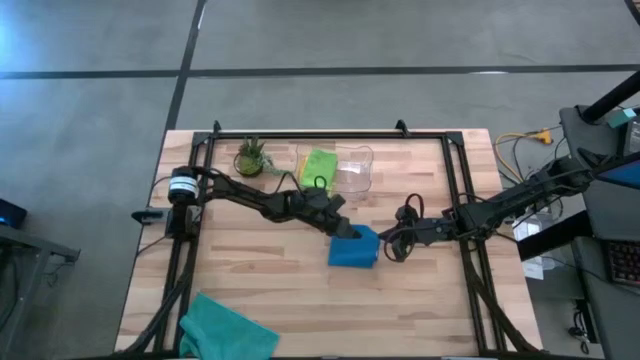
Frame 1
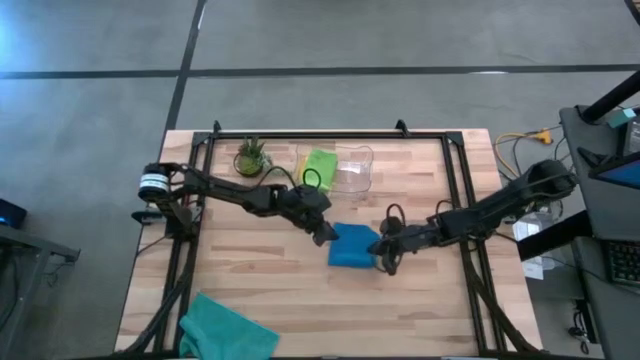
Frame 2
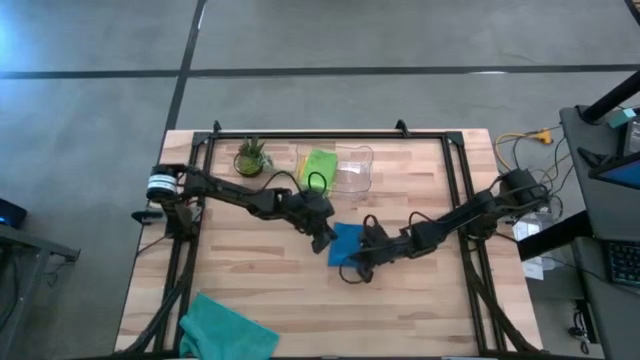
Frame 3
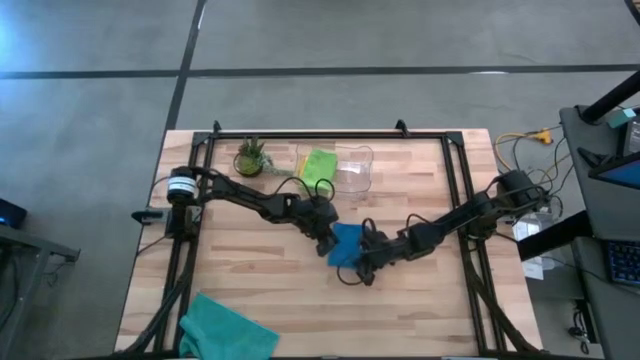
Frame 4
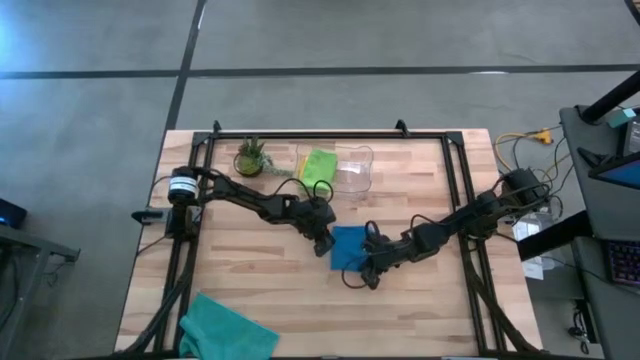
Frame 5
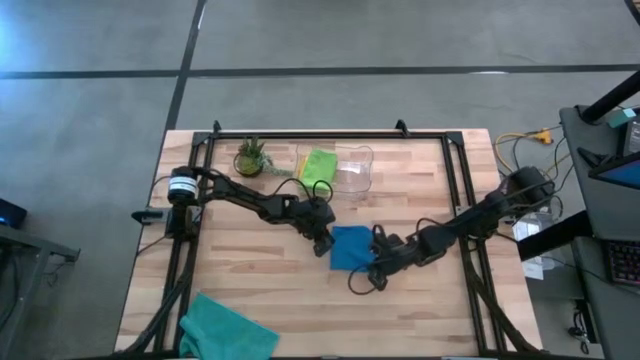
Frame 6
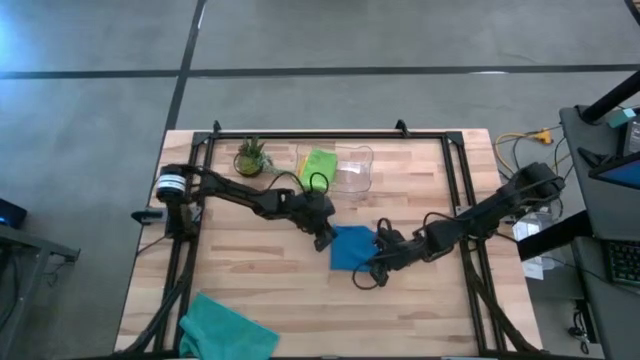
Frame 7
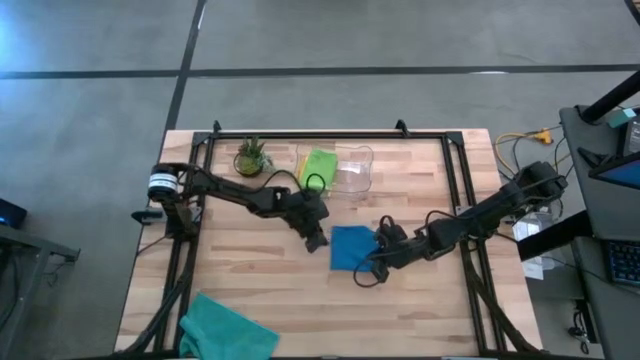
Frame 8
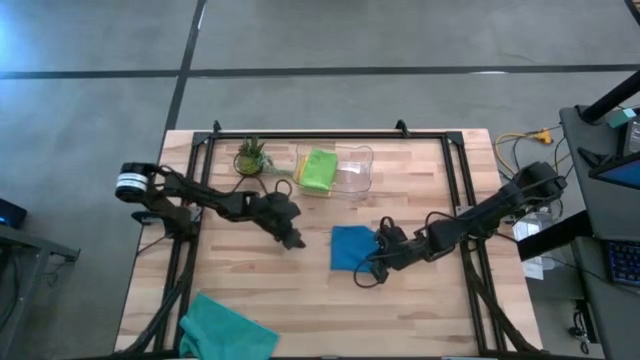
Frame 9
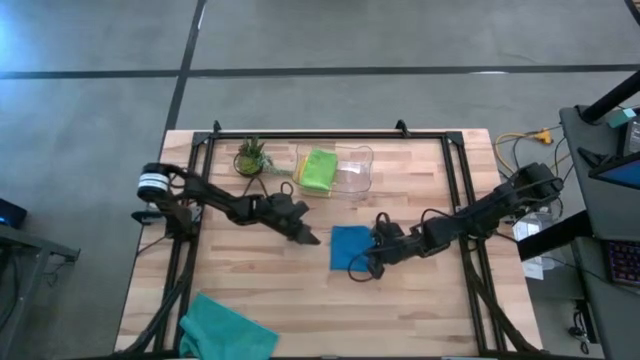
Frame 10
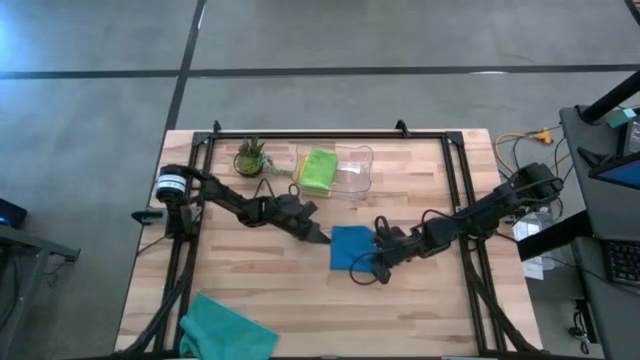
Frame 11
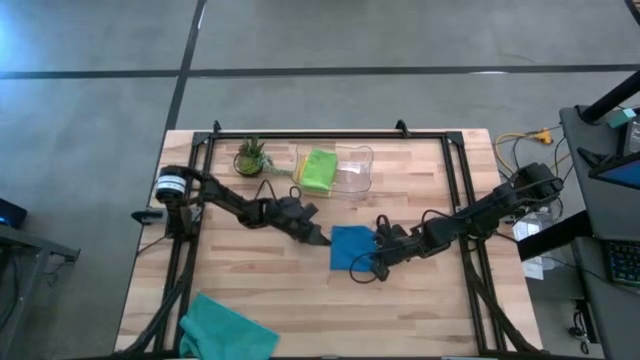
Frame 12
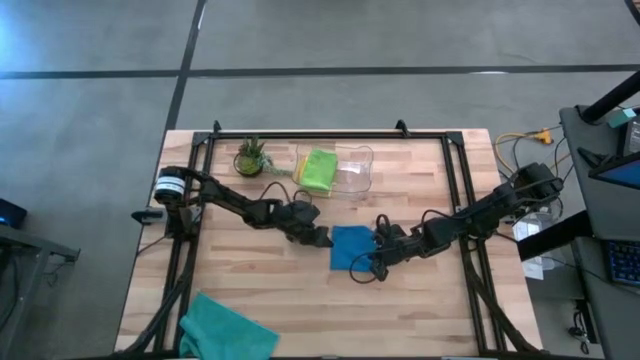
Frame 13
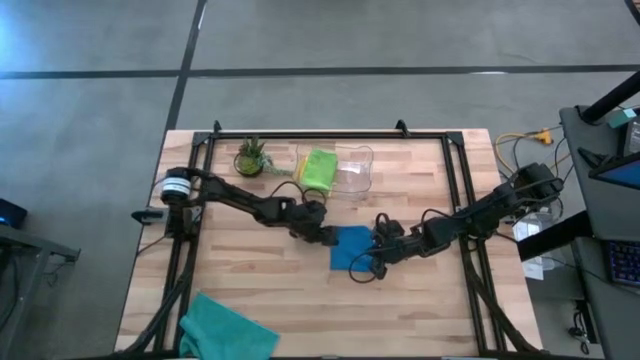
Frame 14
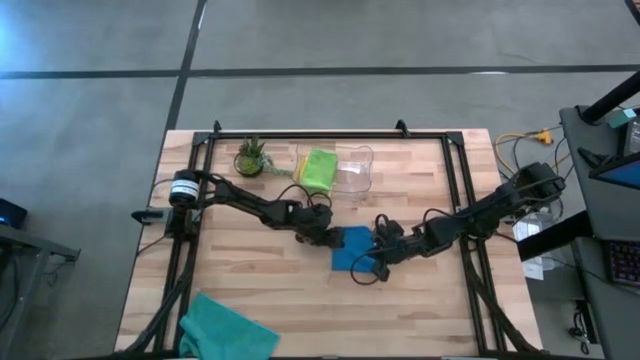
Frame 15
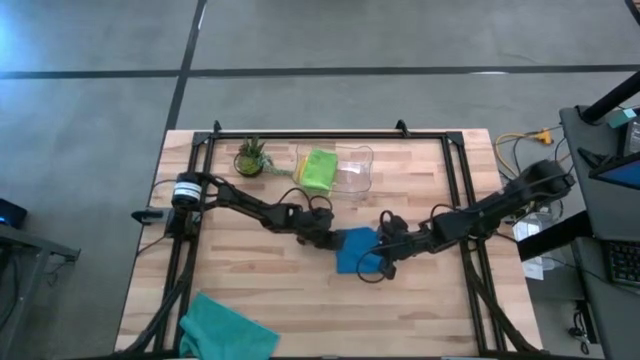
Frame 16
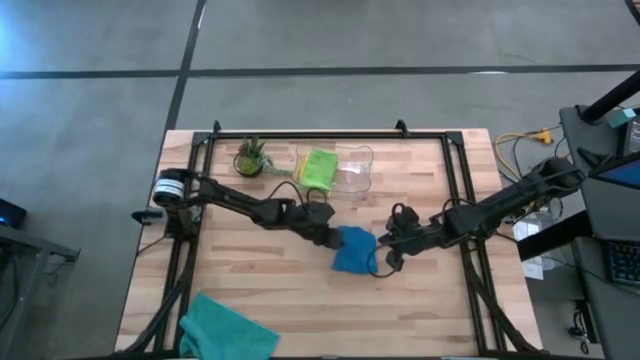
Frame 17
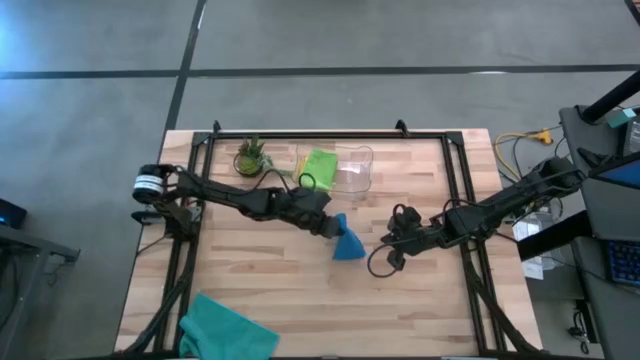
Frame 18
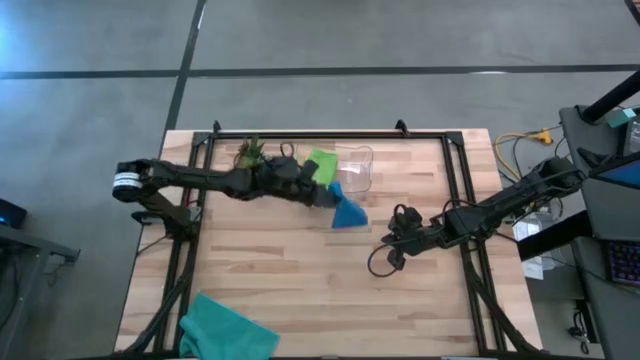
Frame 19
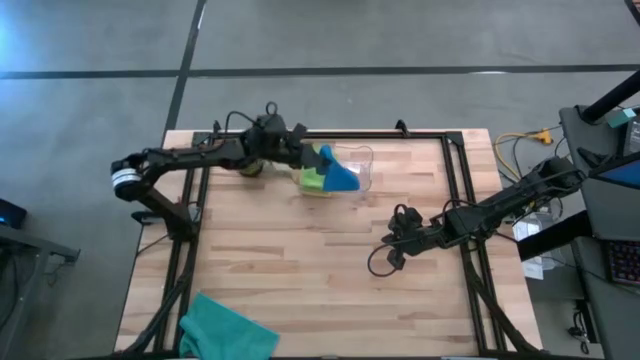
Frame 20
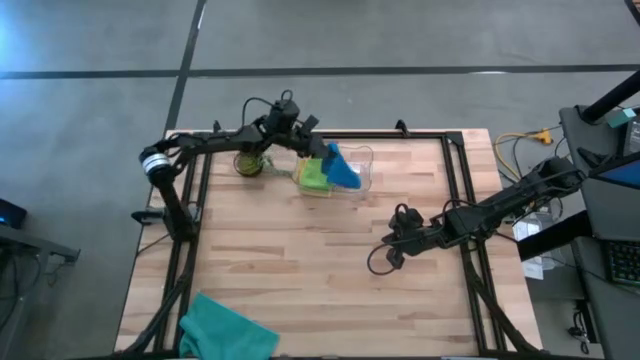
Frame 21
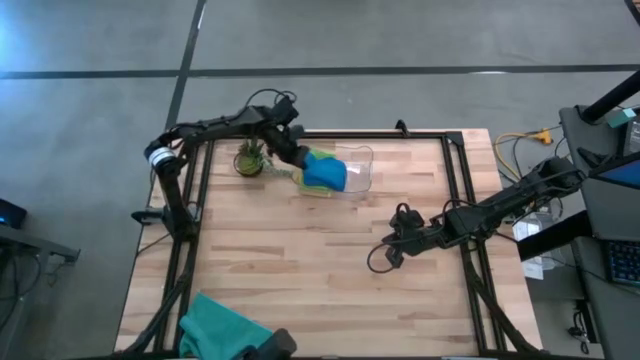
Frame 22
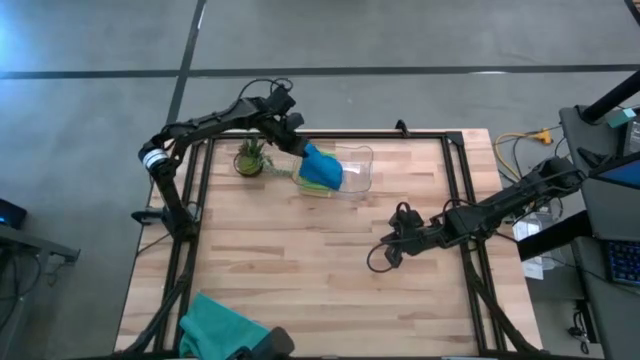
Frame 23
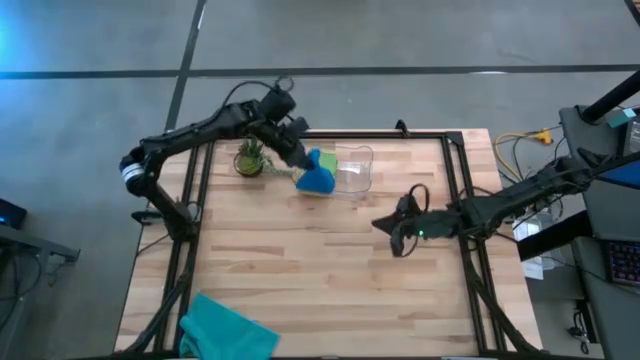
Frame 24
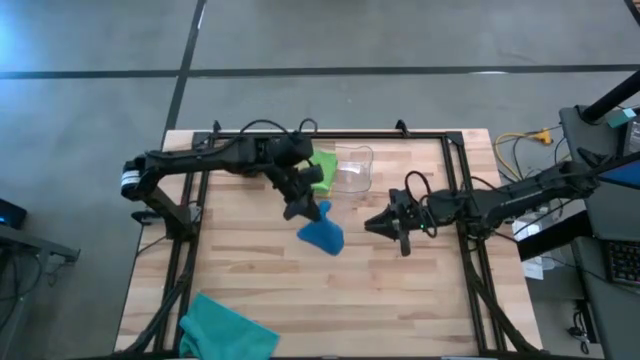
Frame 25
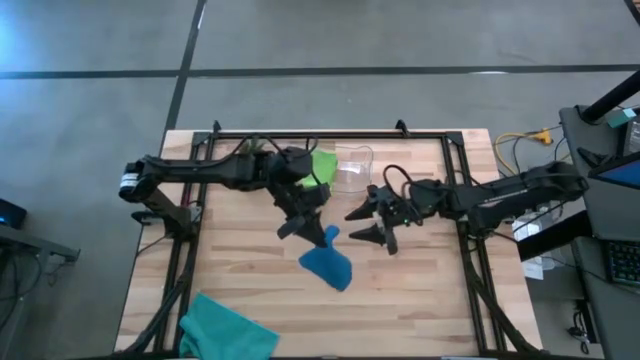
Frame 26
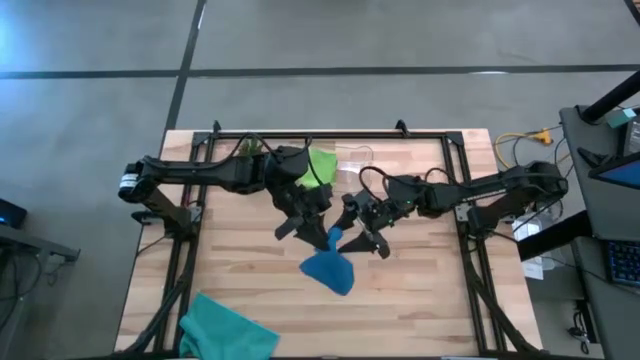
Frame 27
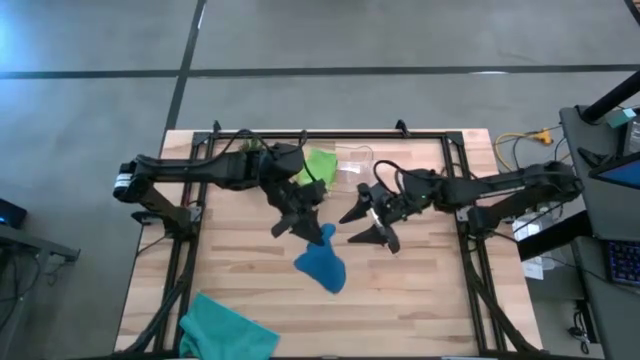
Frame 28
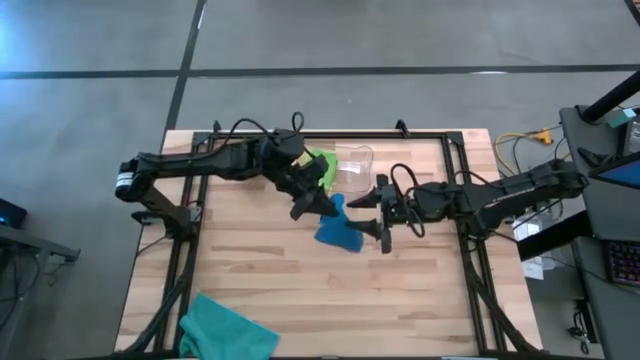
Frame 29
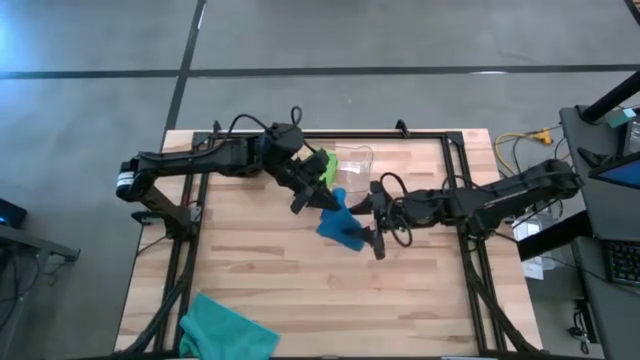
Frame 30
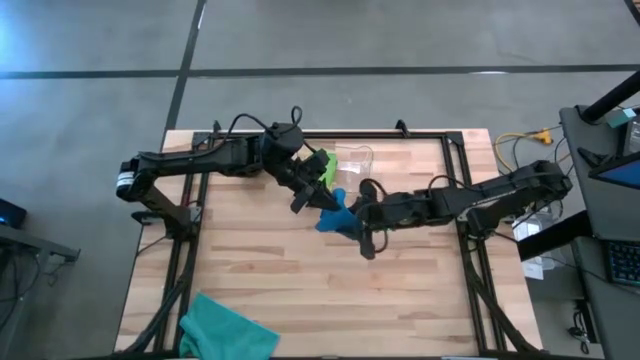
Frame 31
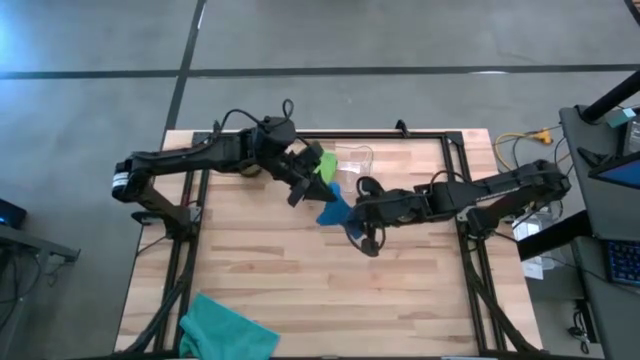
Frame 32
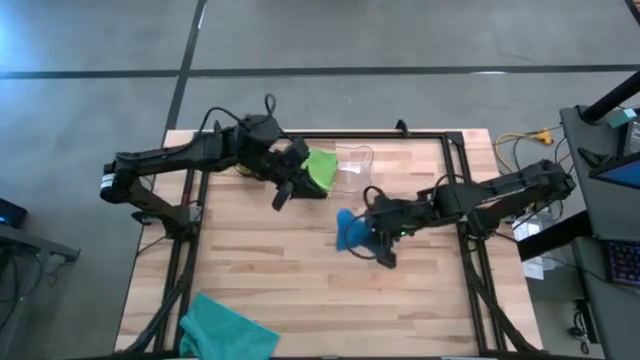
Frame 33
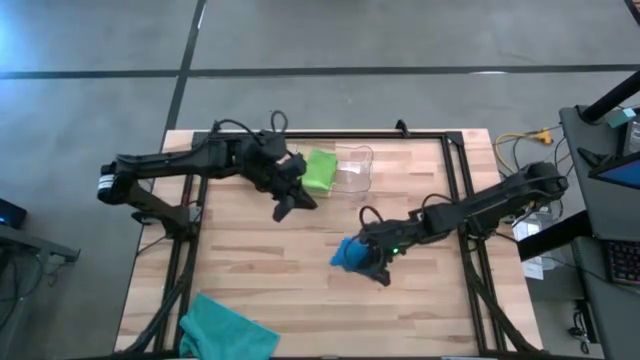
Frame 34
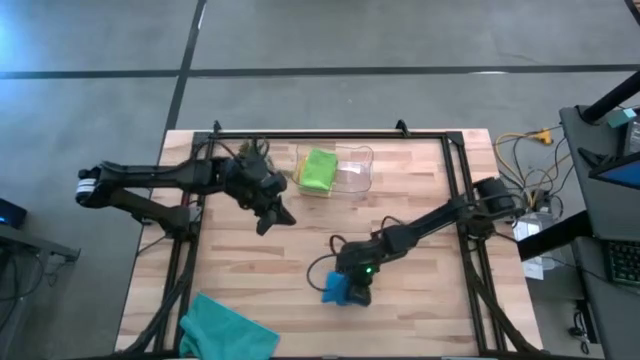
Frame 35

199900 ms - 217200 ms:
Task: Fold microfiber towels
Fold the blue microfiber towel

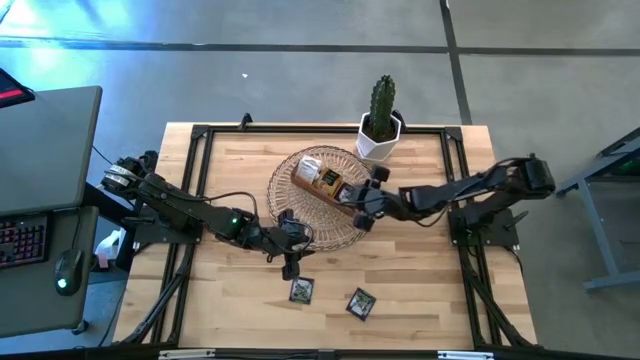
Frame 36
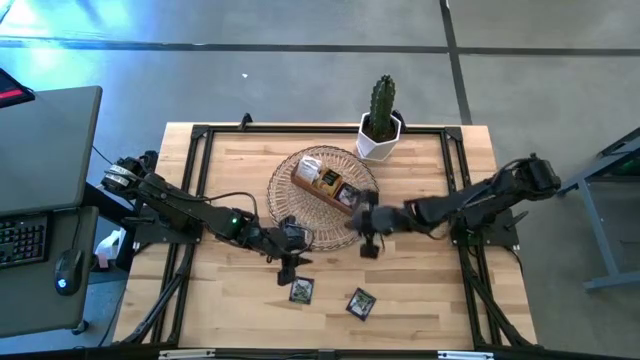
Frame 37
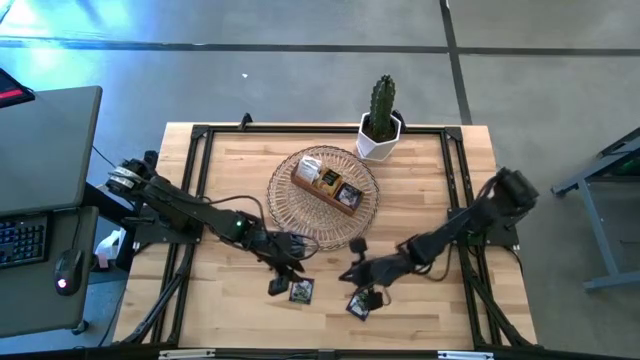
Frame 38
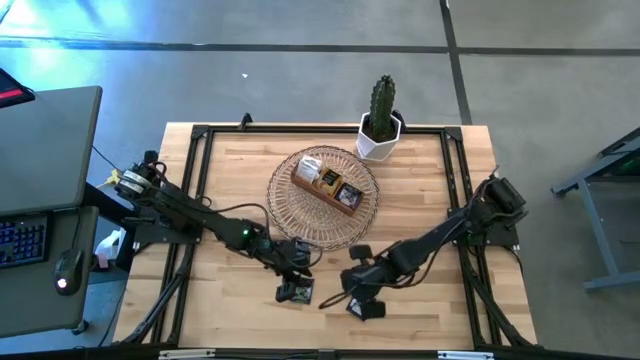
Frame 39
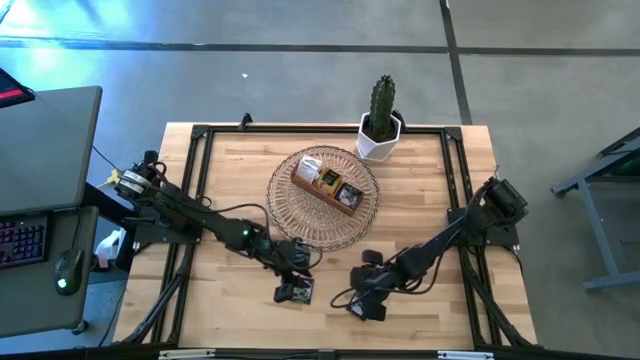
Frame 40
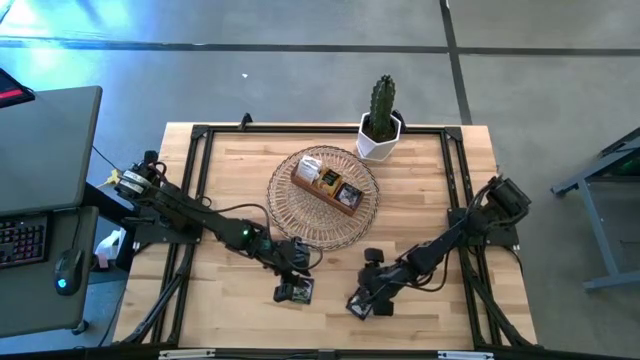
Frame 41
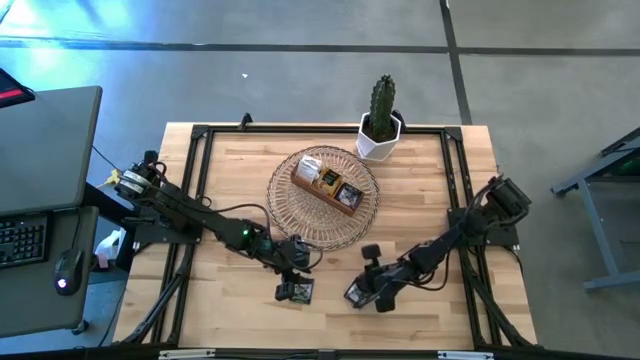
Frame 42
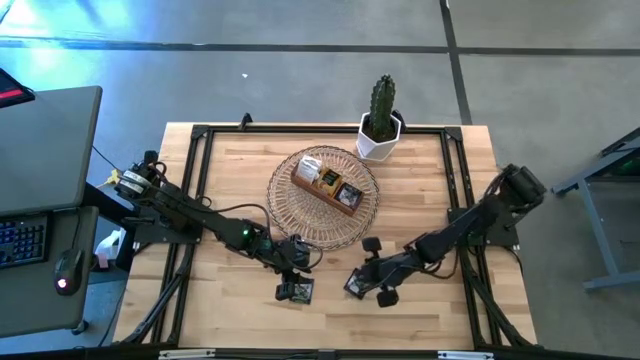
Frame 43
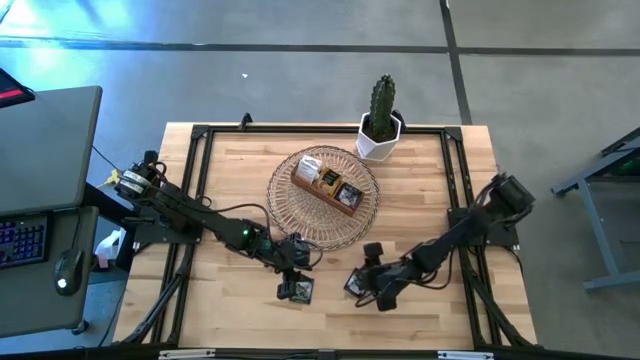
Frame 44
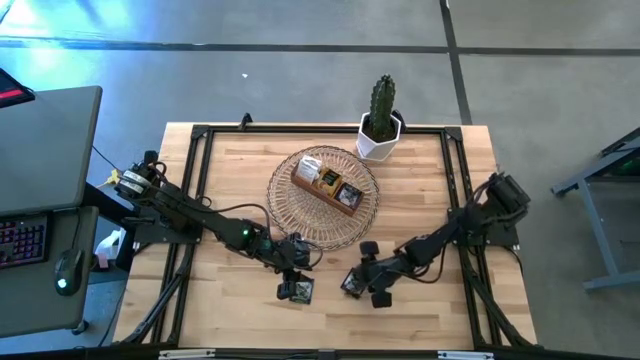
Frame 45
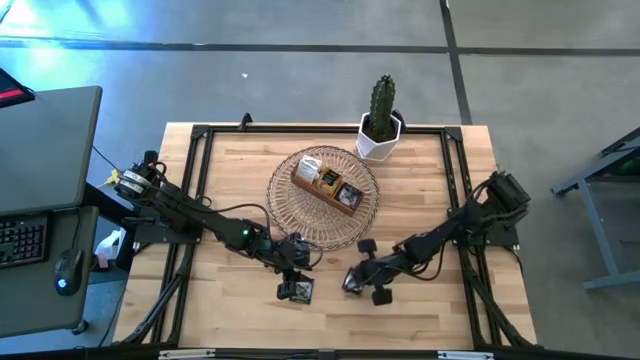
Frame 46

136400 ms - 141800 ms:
Task: Pick & Place Tea
Put the purple tea pack into the right section of the wooden organizer
